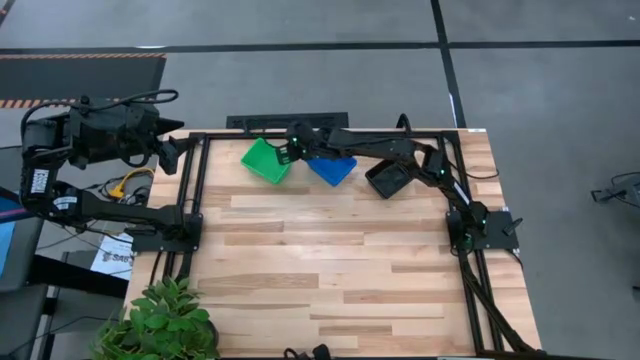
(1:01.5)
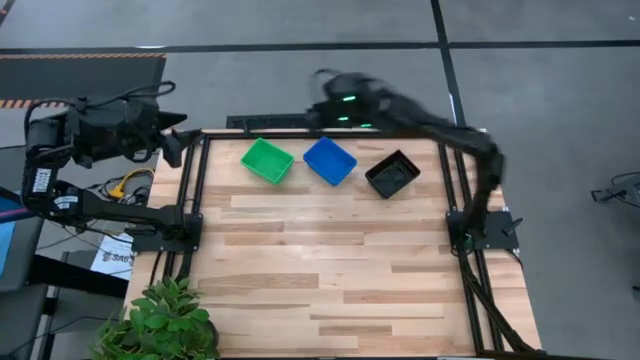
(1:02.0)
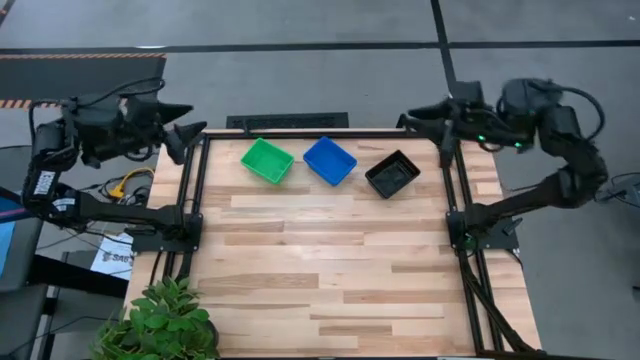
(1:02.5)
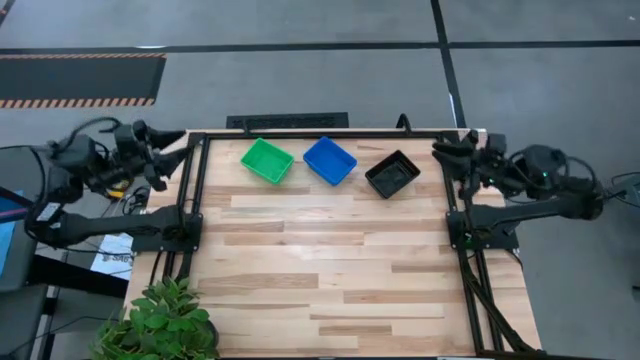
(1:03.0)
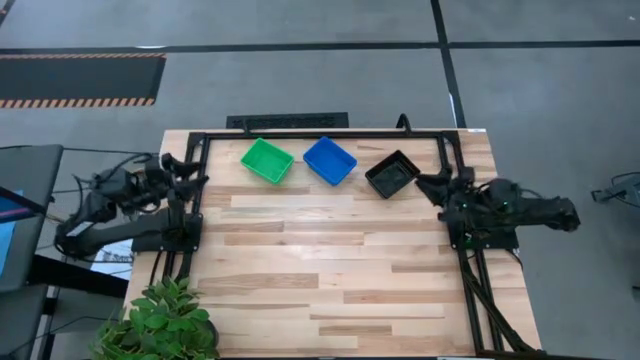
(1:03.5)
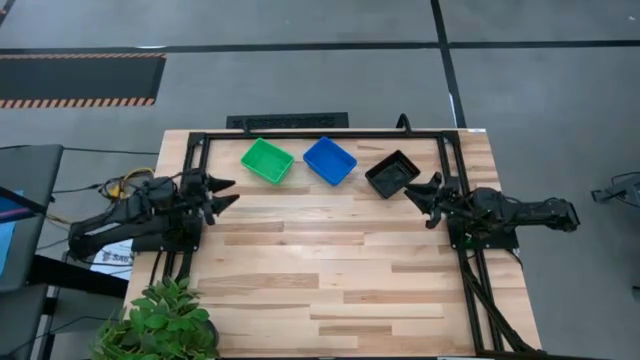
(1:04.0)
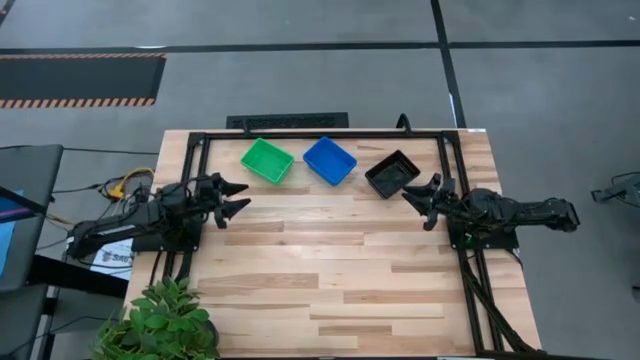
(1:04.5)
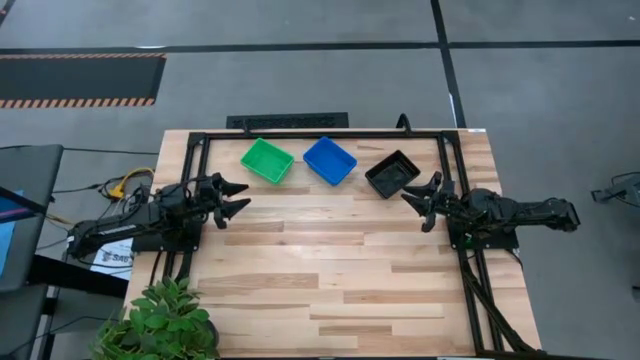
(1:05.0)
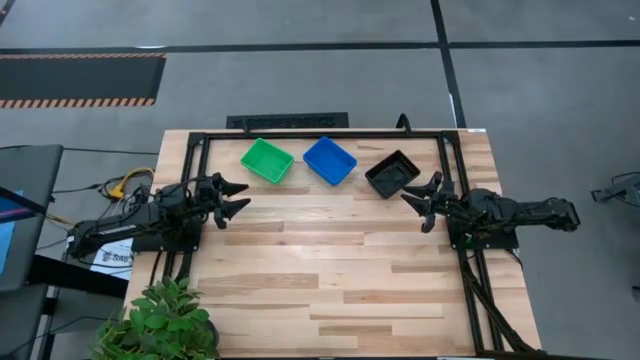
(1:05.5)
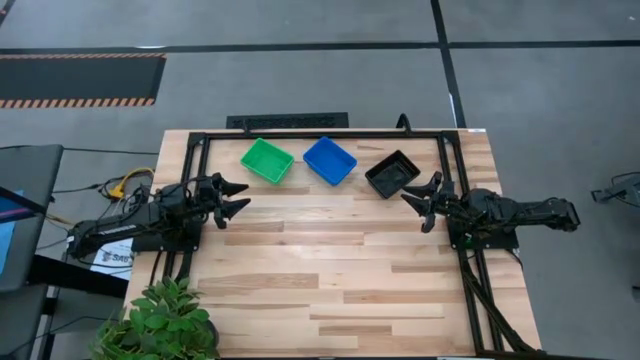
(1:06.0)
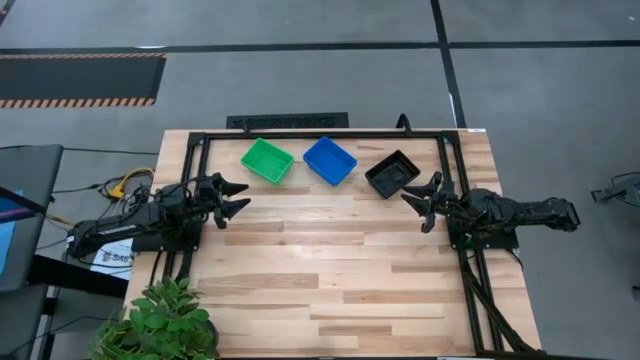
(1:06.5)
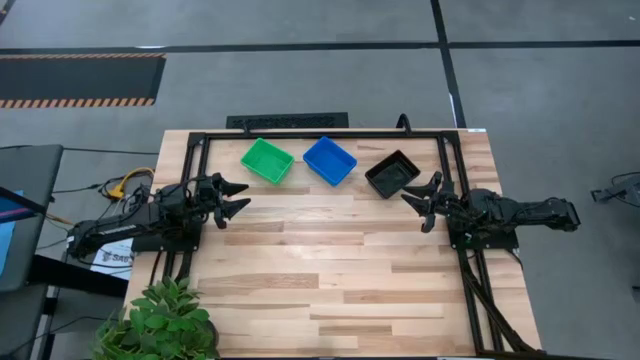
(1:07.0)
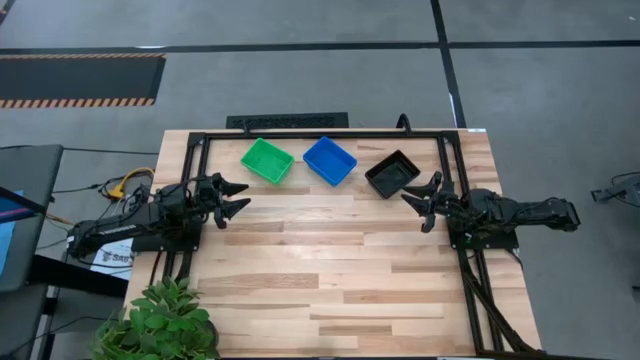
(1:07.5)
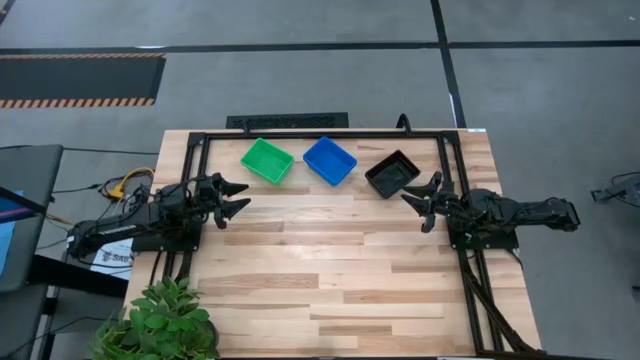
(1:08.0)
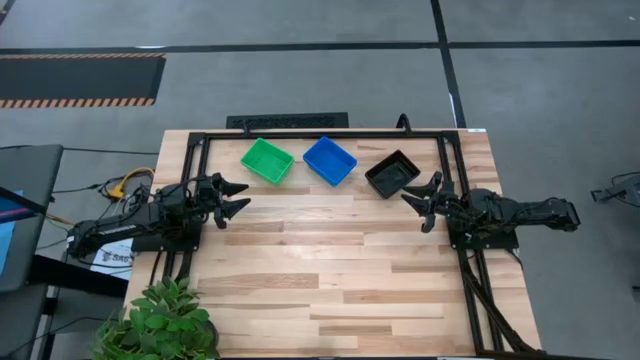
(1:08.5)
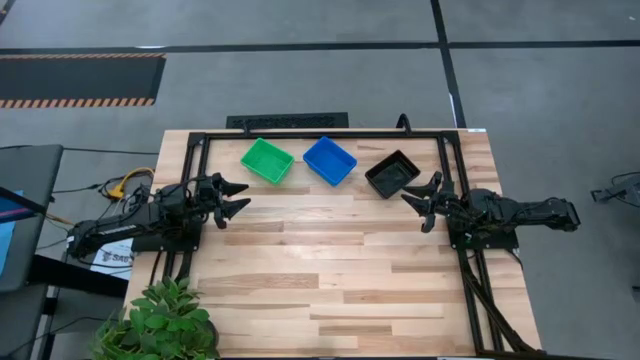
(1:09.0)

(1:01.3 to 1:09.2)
Return to Home Position

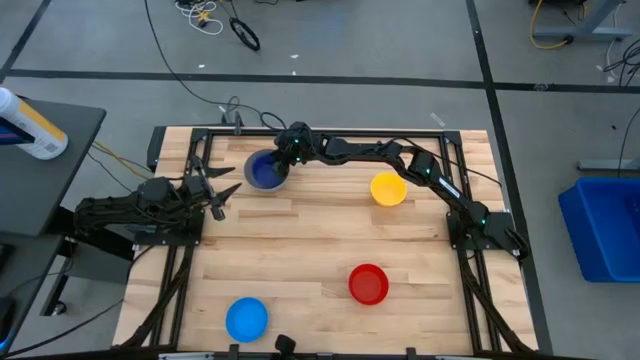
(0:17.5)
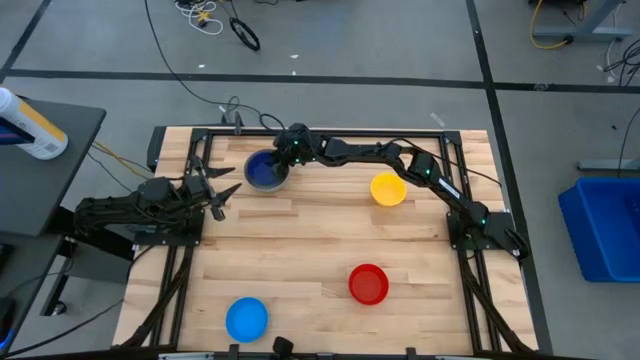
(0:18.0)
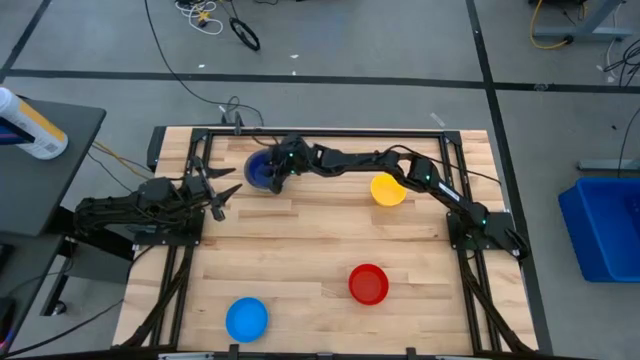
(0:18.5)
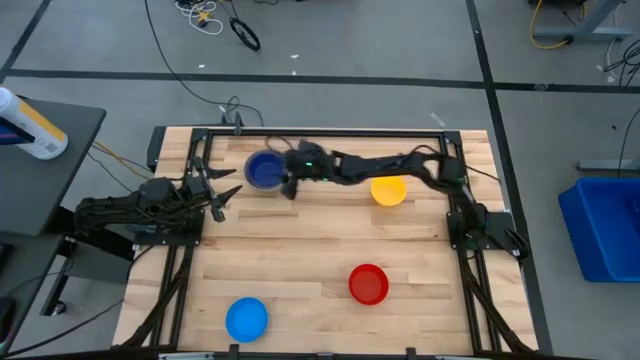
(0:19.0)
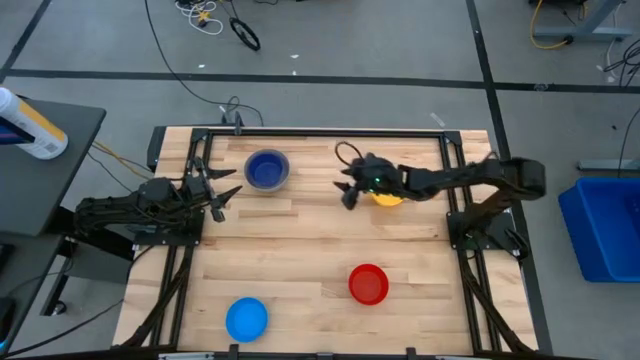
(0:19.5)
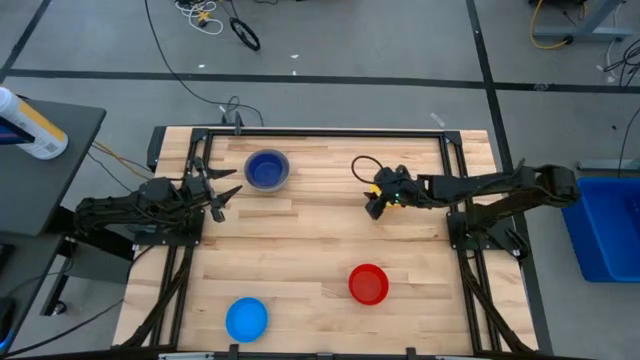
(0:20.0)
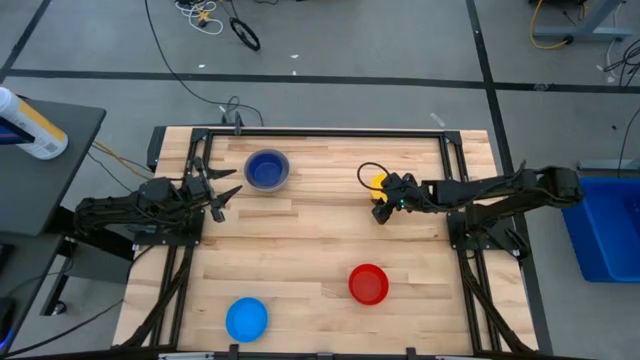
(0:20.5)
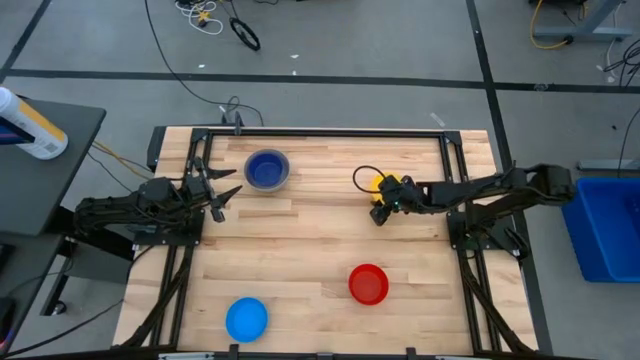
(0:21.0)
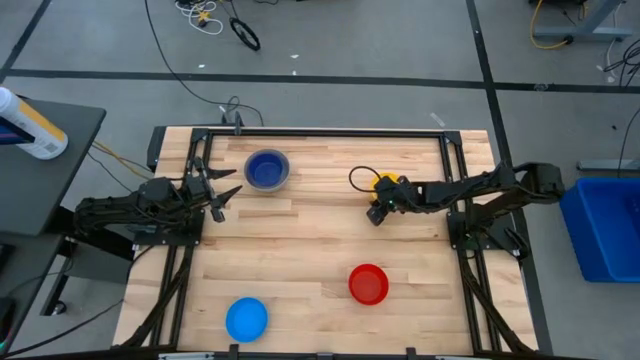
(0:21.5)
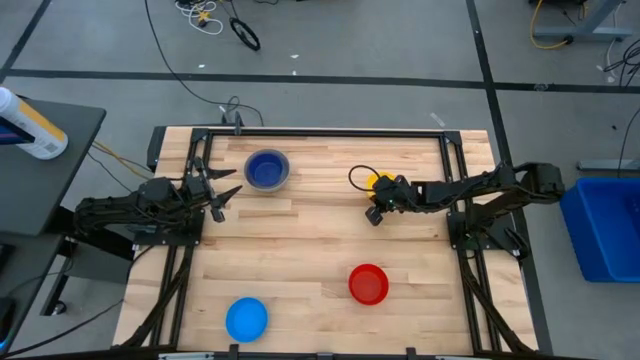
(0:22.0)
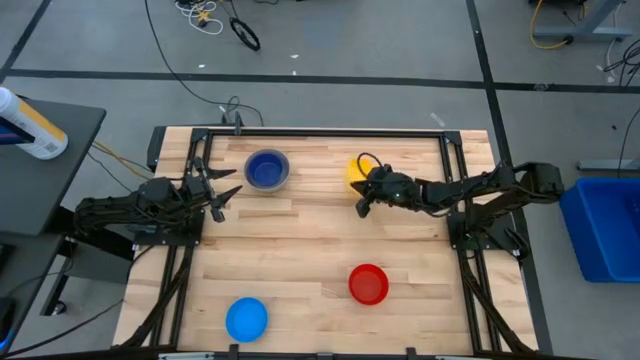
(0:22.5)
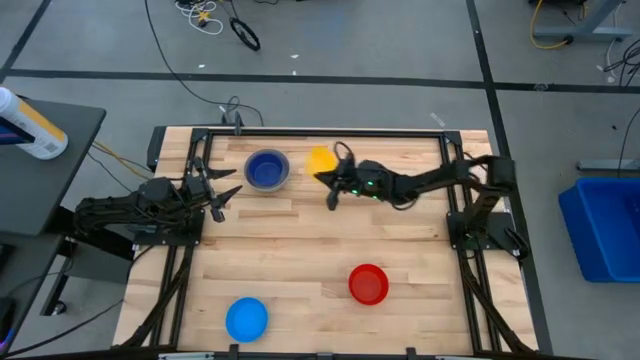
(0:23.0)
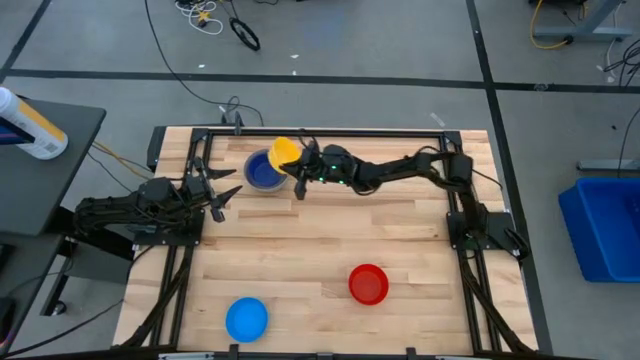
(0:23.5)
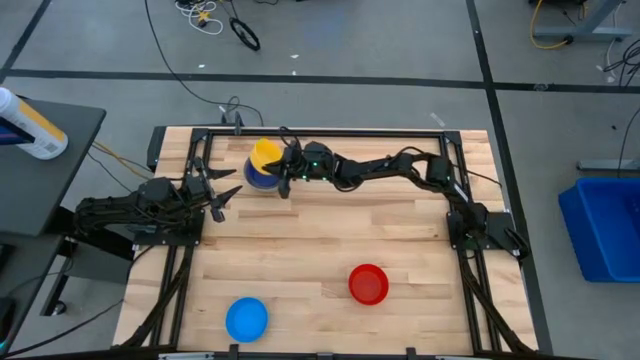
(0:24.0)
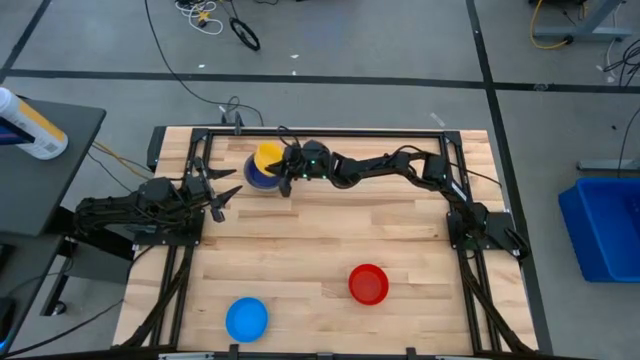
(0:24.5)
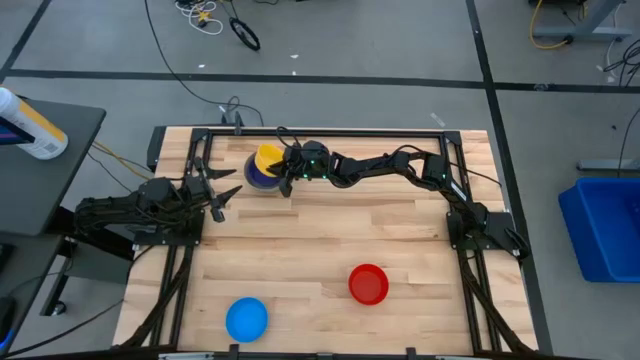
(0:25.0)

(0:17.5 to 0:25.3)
Stack the yellow bowl on the blue bowl
